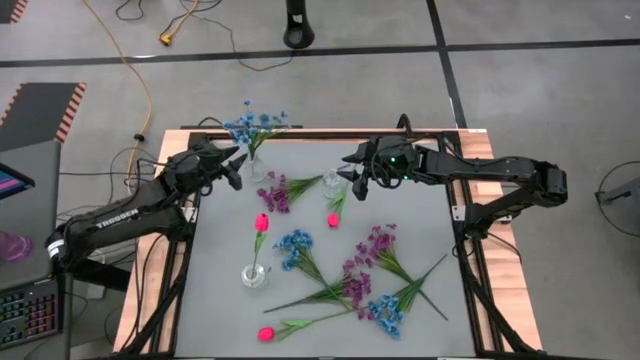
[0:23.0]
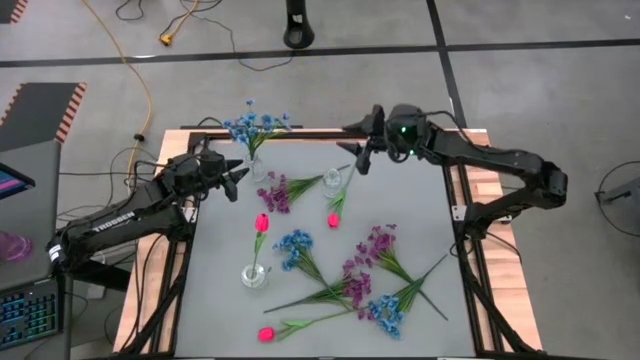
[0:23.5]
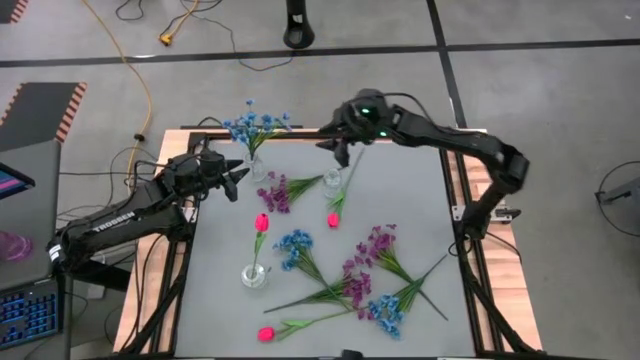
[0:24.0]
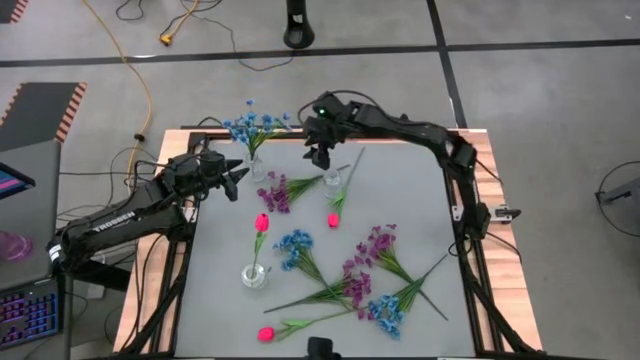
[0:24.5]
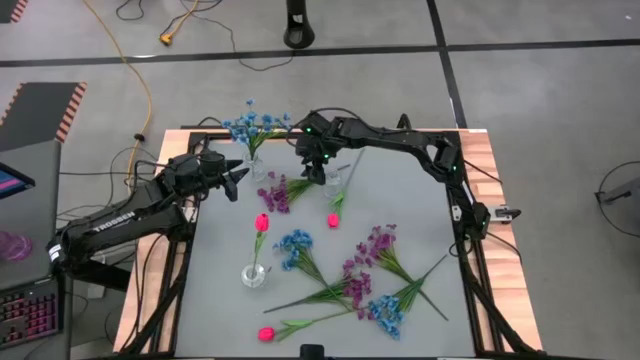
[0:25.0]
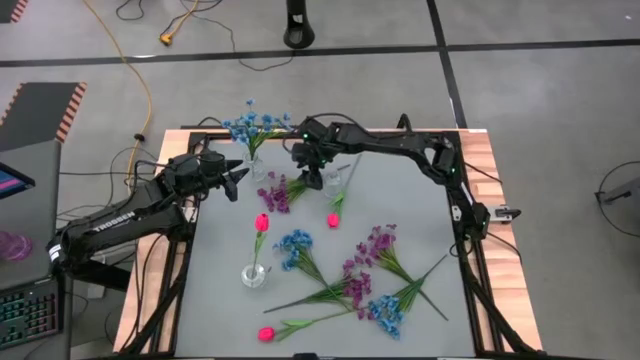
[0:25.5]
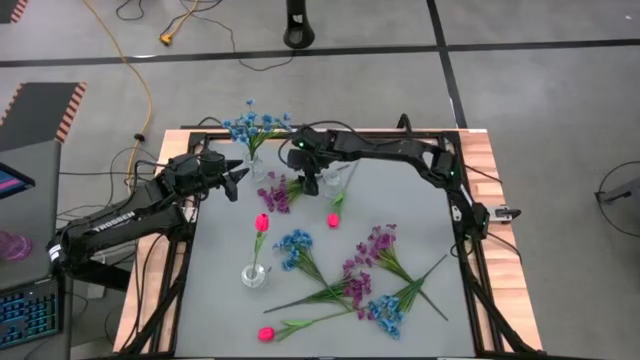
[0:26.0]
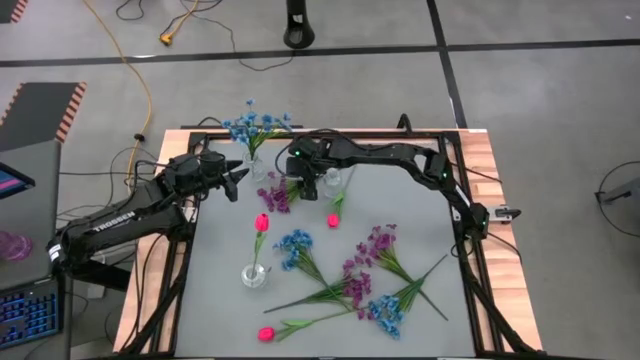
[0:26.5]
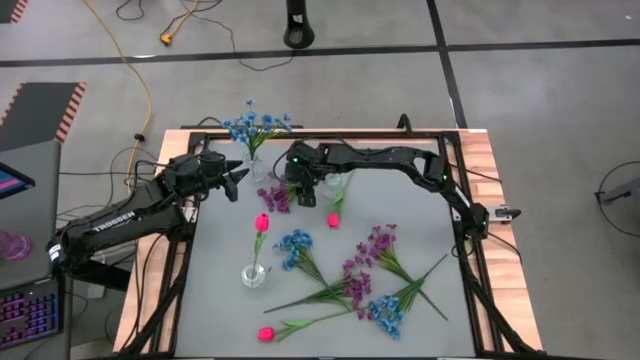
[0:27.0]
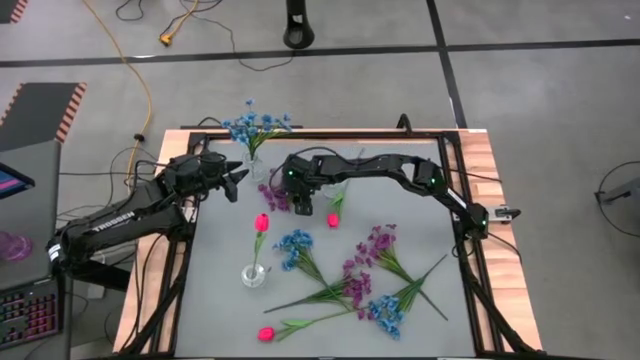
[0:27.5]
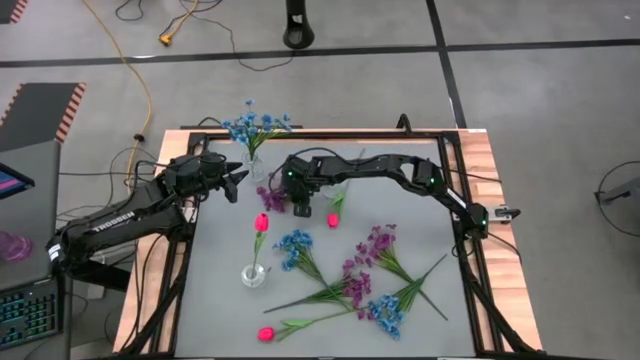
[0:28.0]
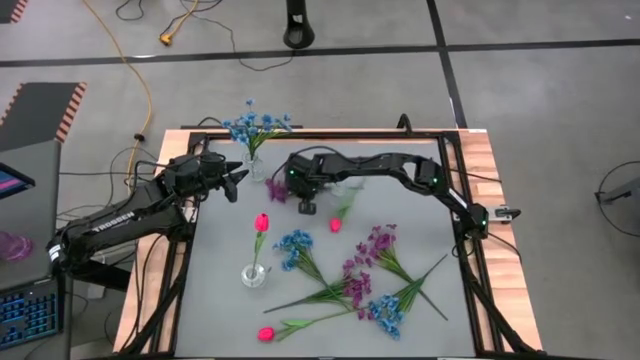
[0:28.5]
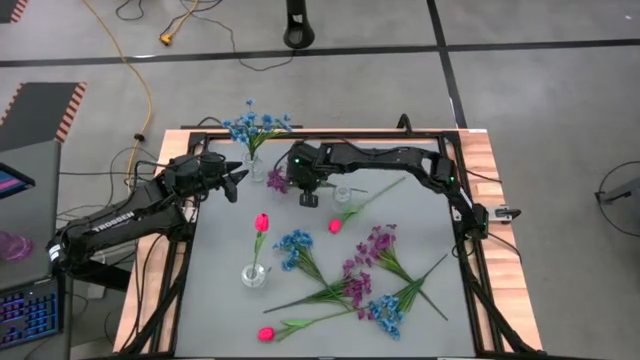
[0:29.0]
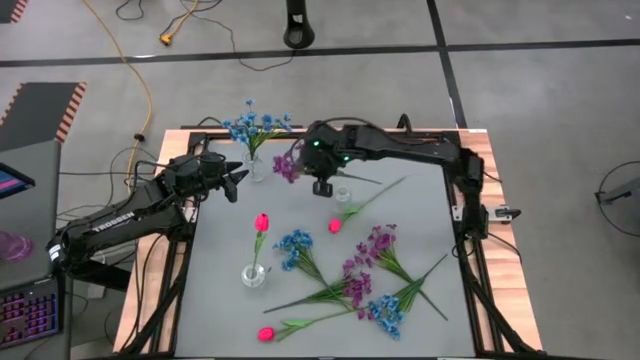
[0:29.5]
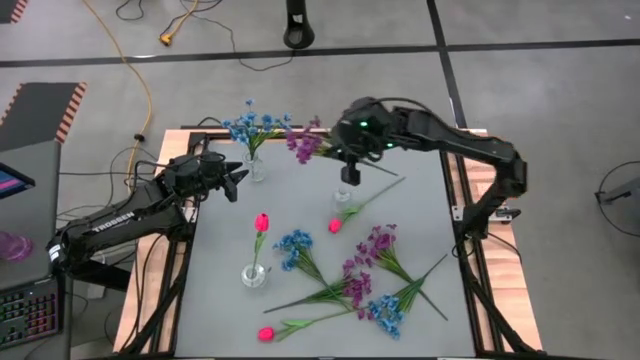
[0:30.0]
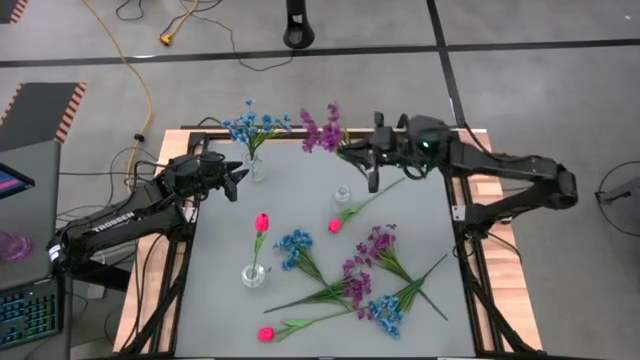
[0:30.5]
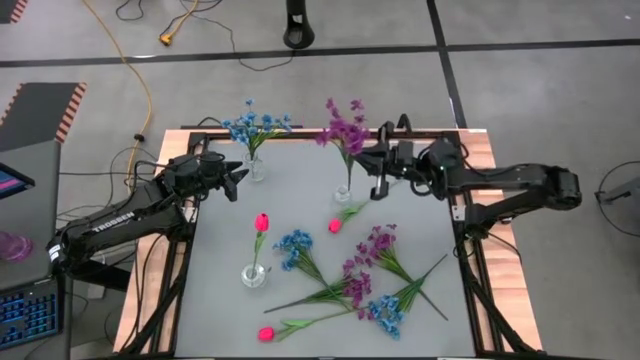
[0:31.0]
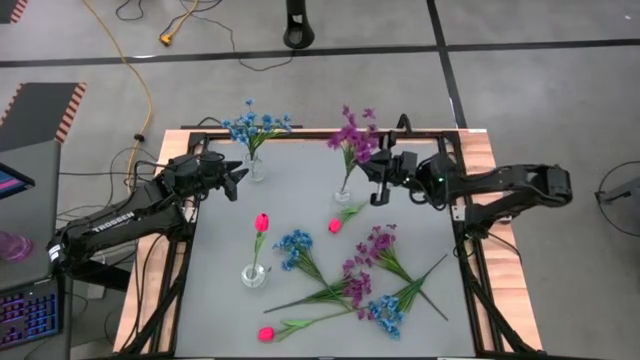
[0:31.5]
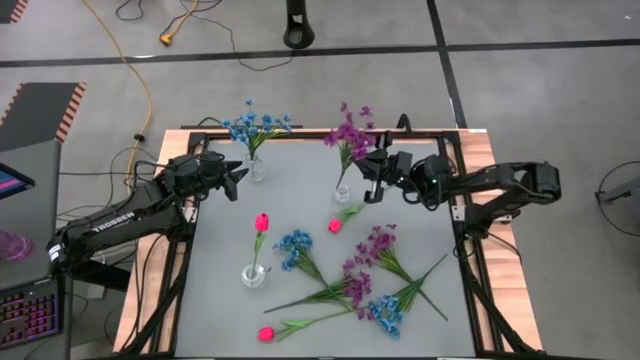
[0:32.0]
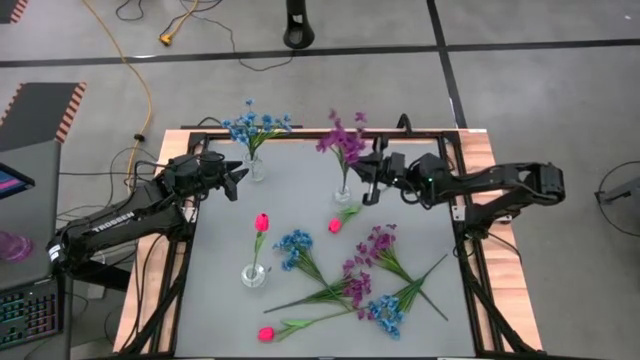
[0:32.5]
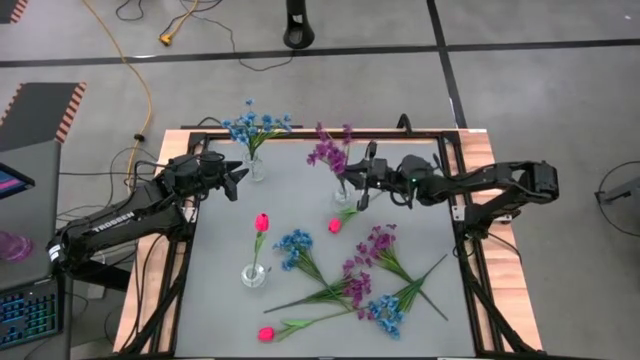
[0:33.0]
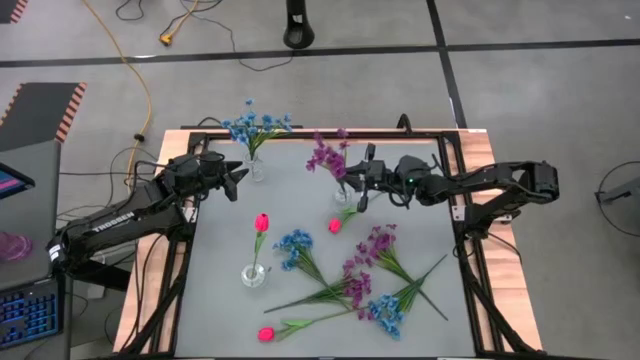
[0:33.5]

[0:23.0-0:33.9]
Task: Sort flowers into vase by color
Put the top violet flower into the top right transparent vase

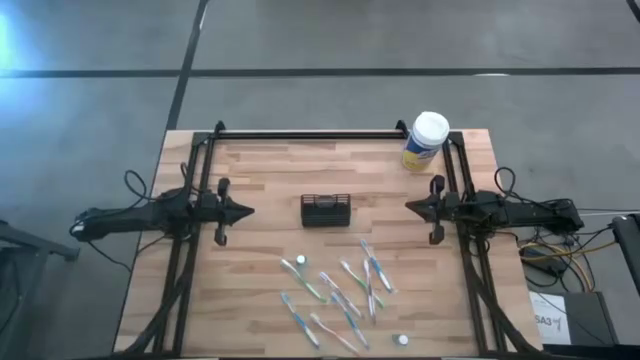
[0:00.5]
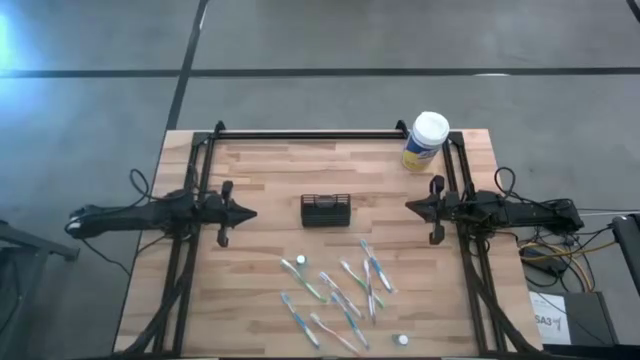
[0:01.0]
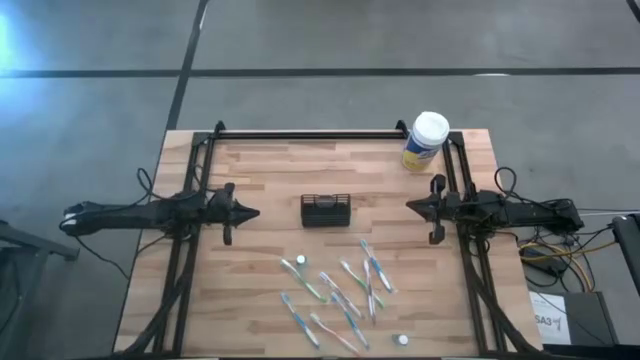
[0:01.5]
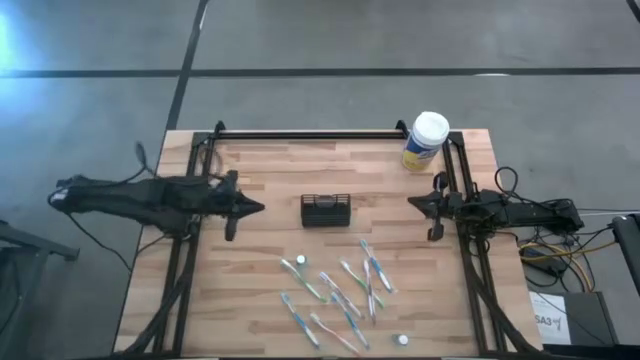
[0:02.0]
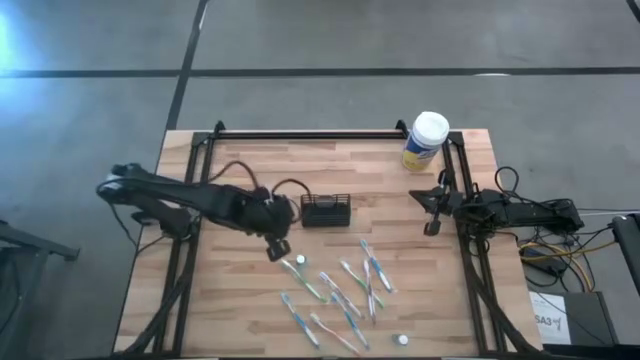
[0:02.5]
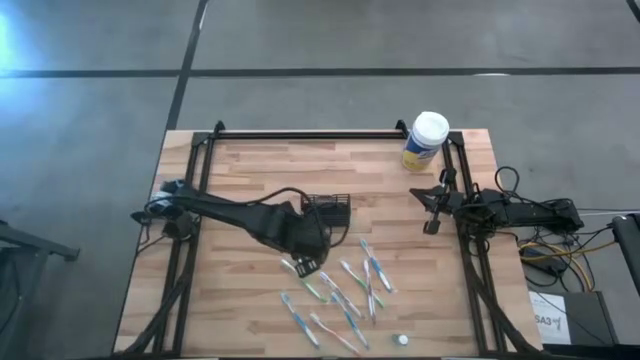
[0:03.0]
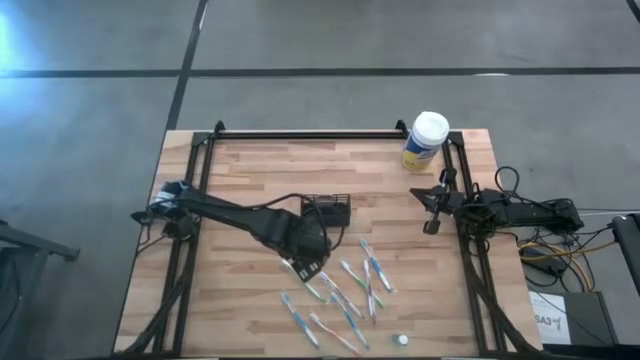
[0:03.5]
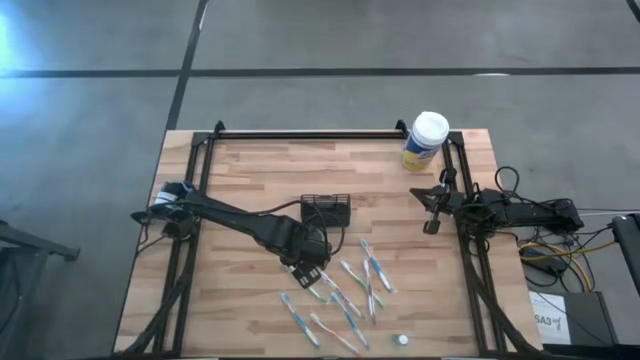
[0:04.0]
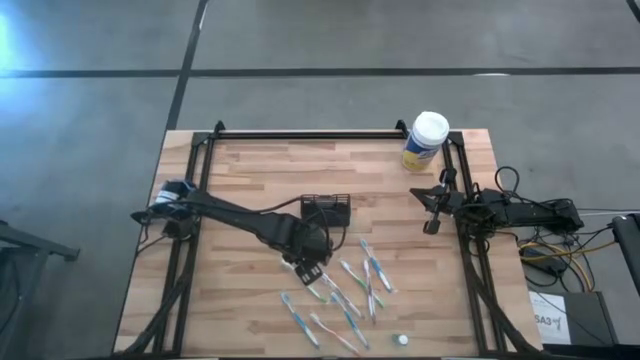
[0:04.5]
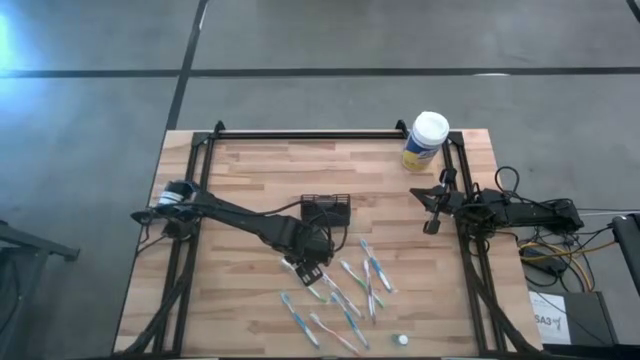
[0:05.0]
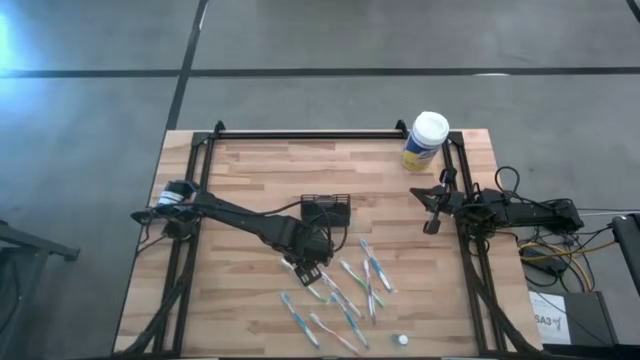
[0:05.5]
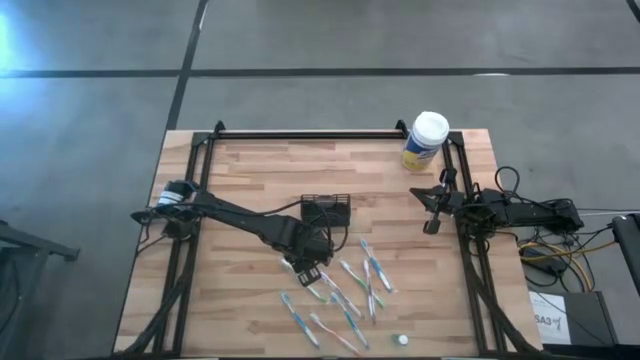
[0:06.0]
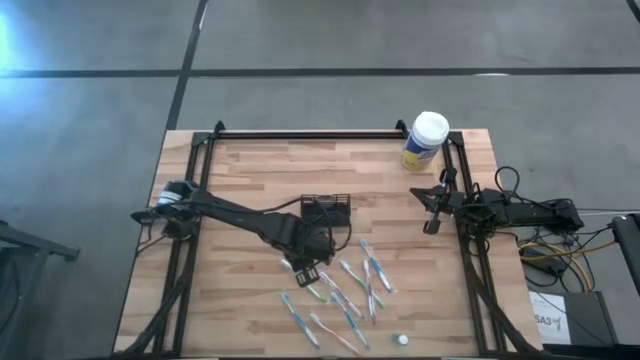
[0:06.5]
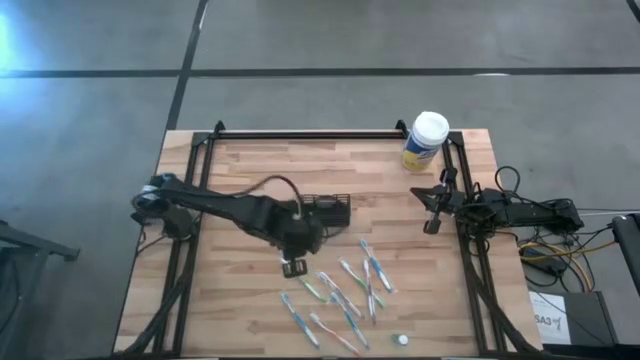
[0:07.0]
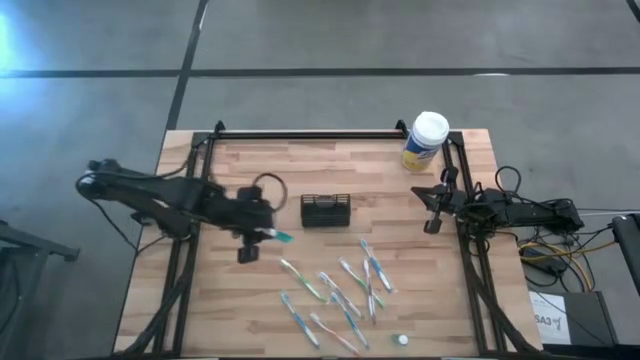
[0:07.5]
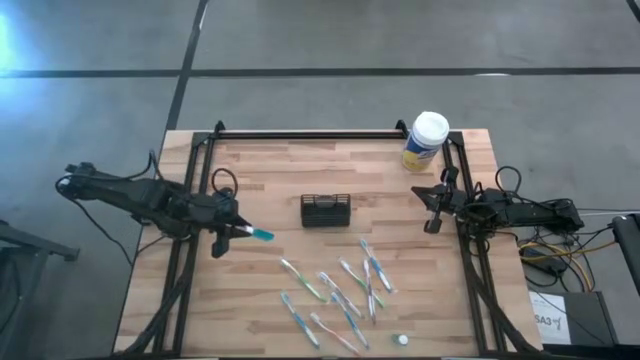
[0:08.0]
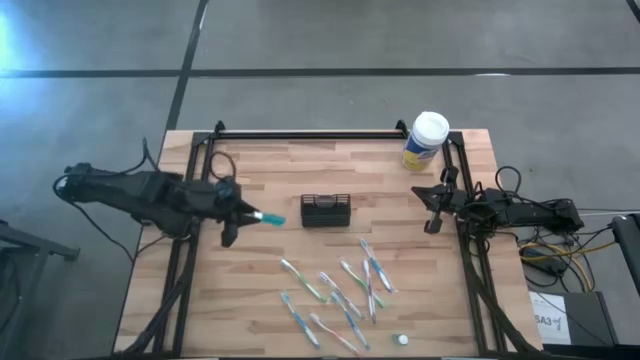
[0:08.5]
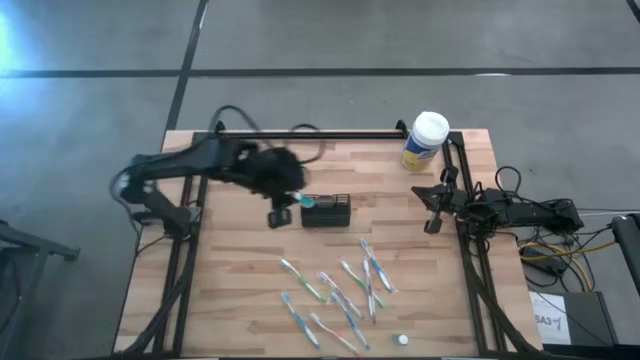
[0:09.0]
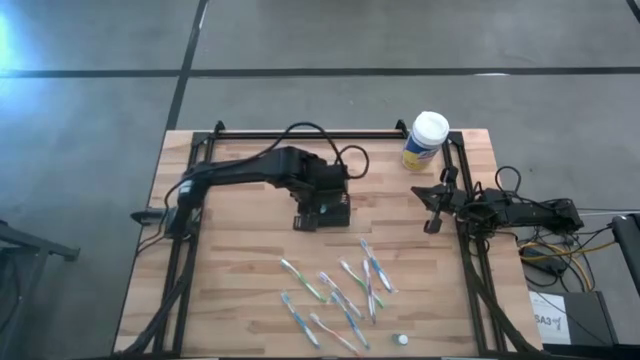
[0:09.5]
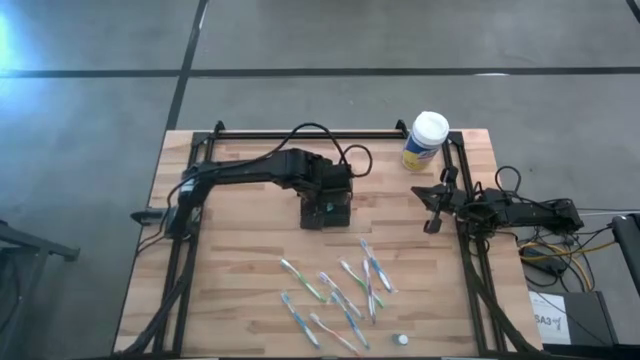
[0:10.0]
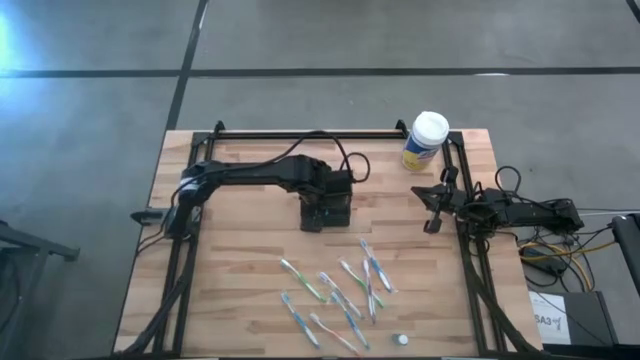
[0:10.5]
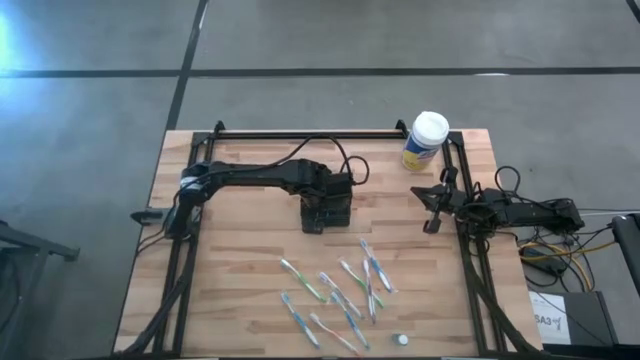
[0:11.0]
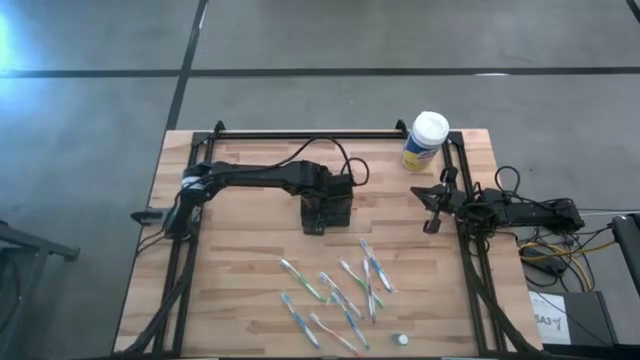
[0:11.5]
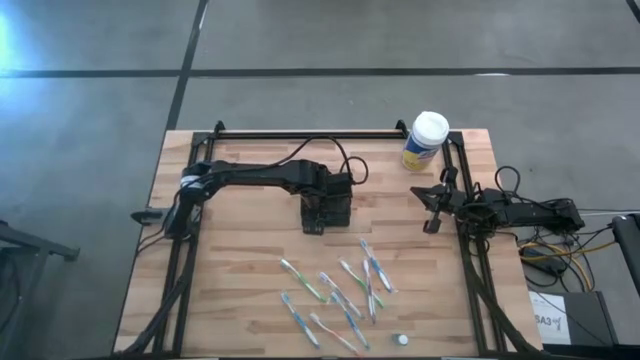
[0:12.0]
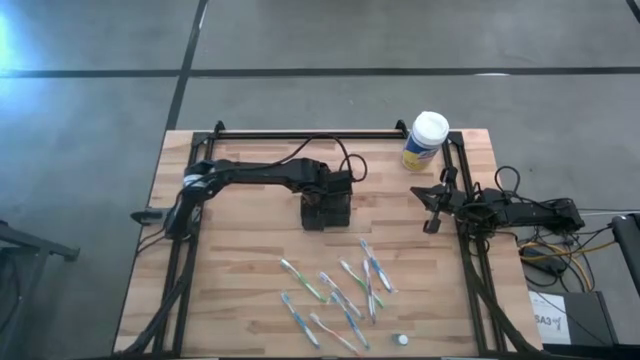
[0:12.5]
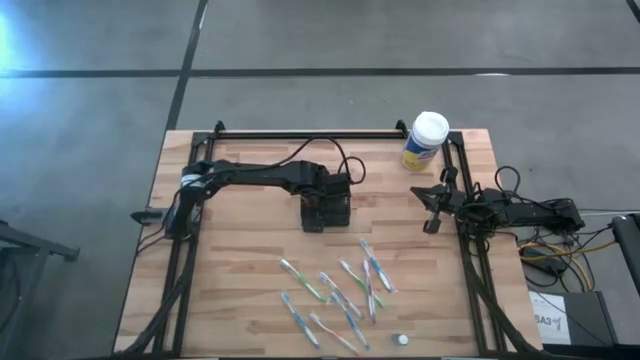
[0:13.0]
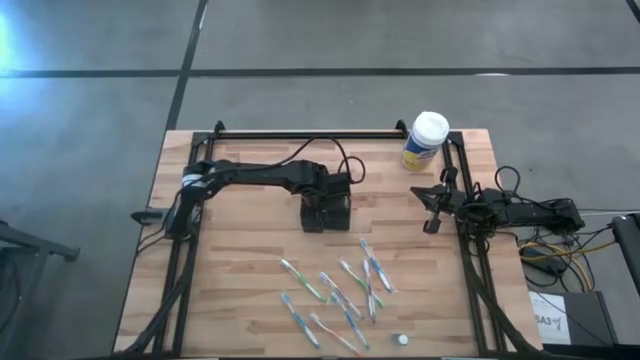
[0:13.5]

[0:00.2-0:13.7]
Task: Pick & Place toothbrushing station
Put the top blue mouthwash into the black mesh organizer
